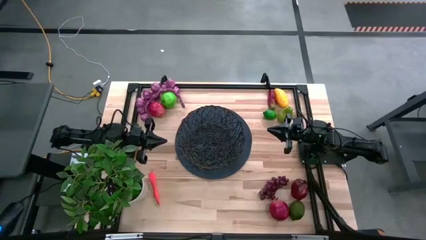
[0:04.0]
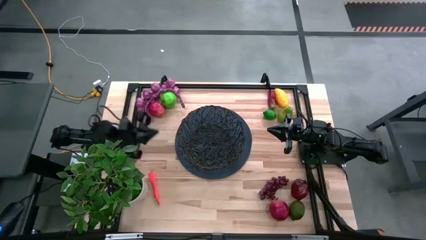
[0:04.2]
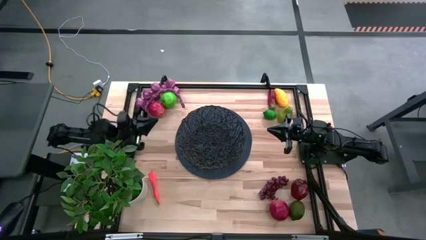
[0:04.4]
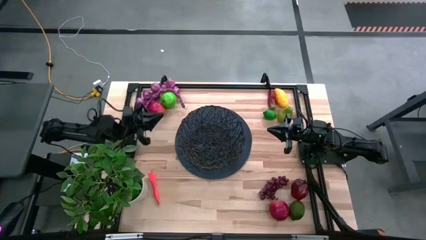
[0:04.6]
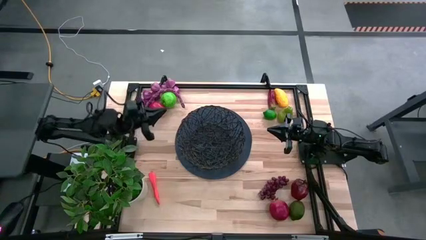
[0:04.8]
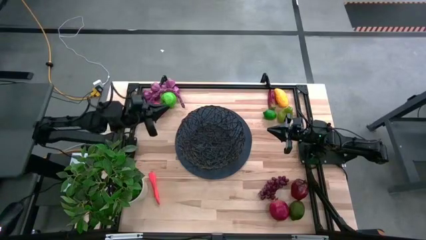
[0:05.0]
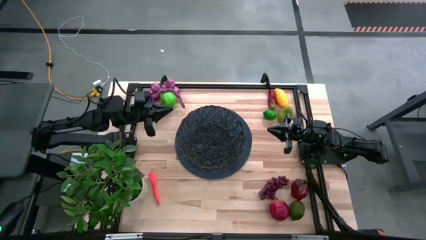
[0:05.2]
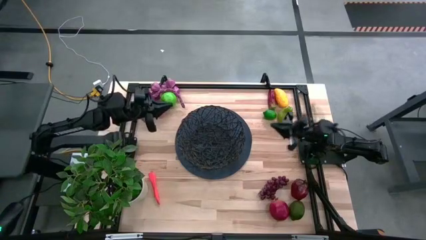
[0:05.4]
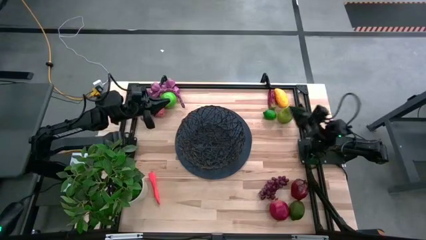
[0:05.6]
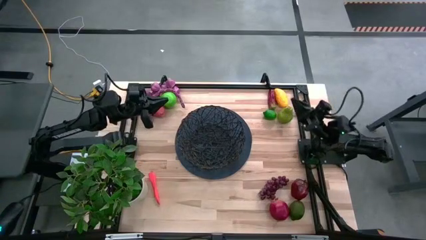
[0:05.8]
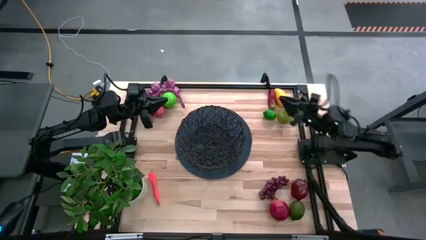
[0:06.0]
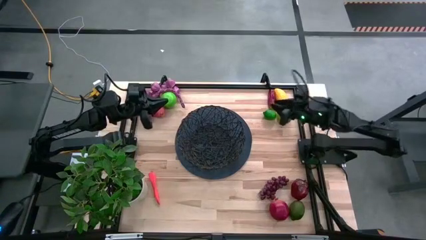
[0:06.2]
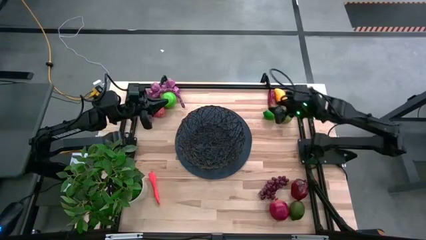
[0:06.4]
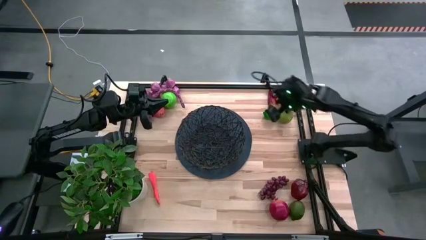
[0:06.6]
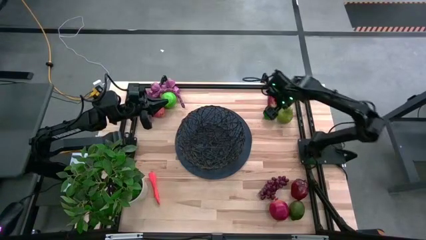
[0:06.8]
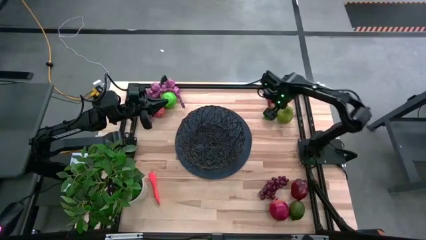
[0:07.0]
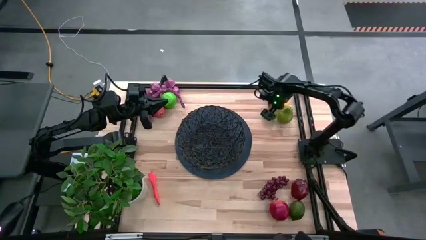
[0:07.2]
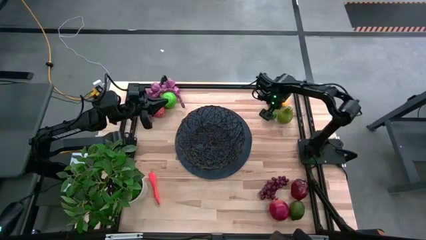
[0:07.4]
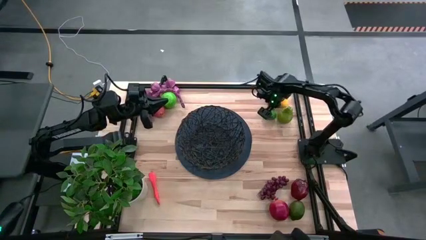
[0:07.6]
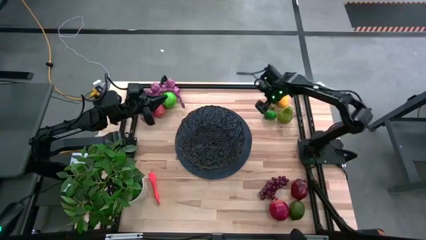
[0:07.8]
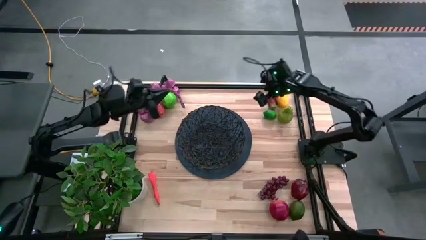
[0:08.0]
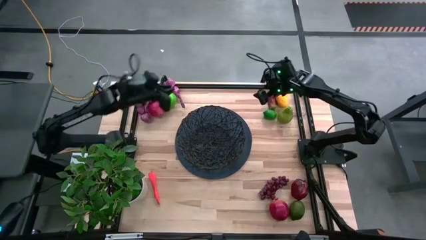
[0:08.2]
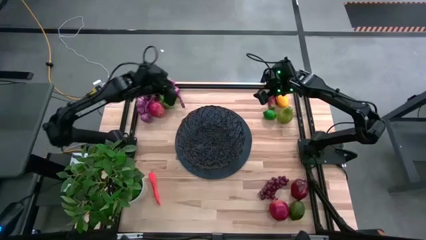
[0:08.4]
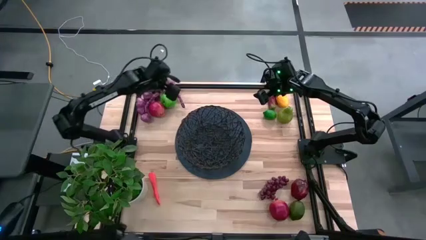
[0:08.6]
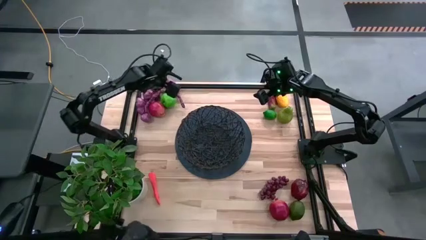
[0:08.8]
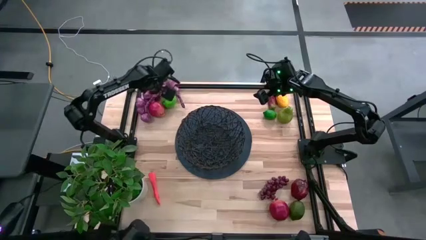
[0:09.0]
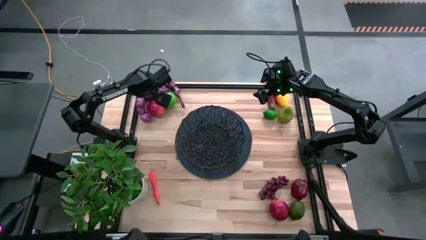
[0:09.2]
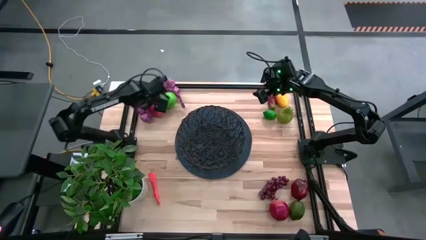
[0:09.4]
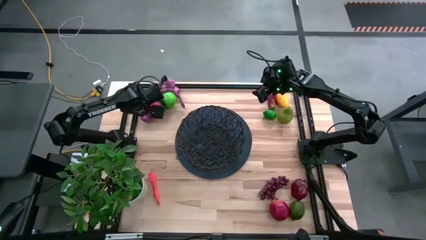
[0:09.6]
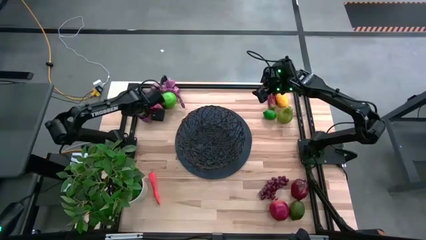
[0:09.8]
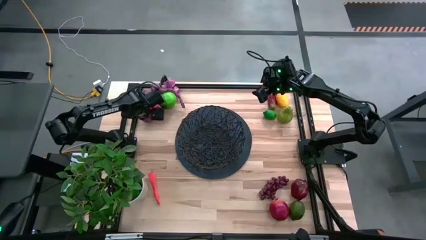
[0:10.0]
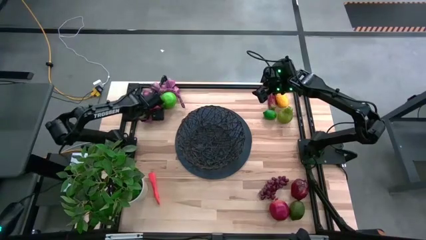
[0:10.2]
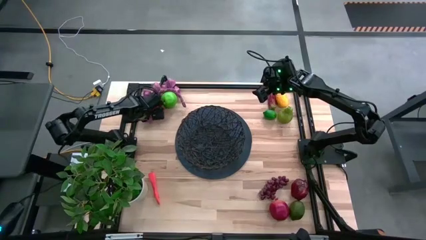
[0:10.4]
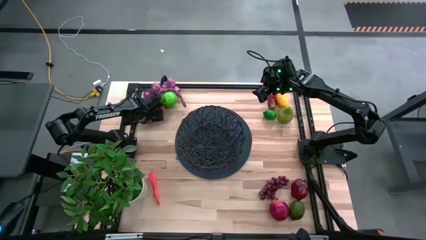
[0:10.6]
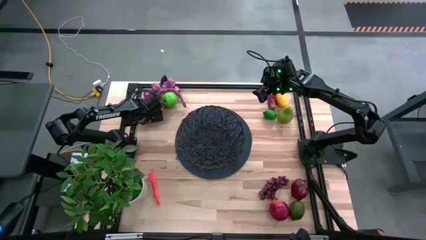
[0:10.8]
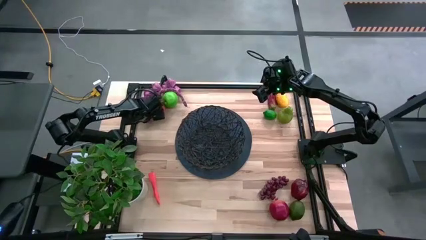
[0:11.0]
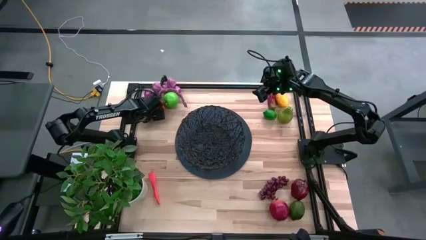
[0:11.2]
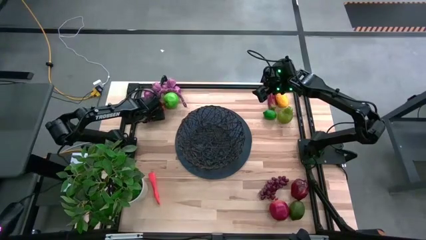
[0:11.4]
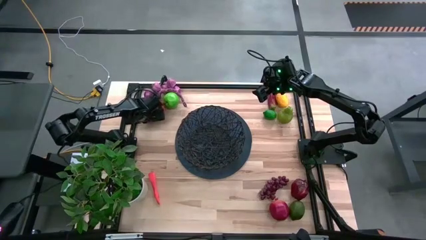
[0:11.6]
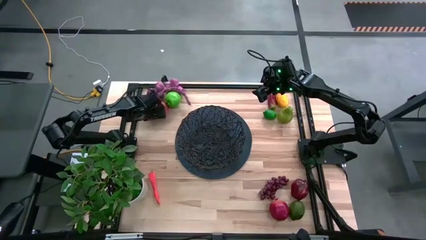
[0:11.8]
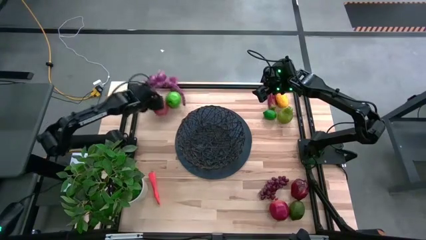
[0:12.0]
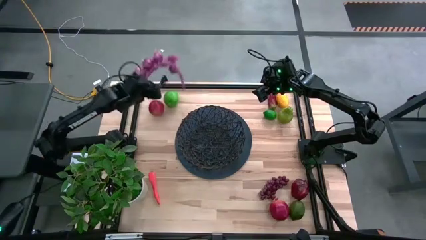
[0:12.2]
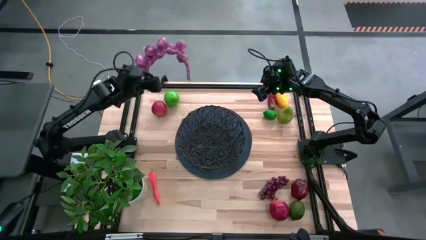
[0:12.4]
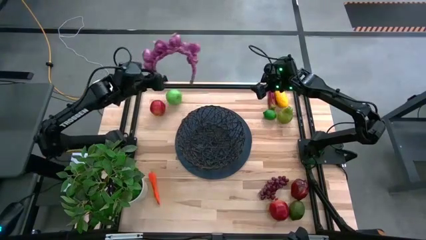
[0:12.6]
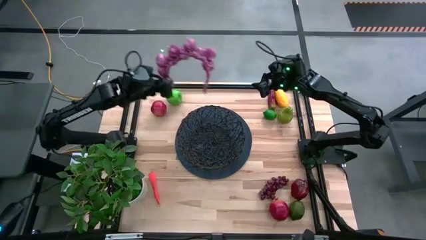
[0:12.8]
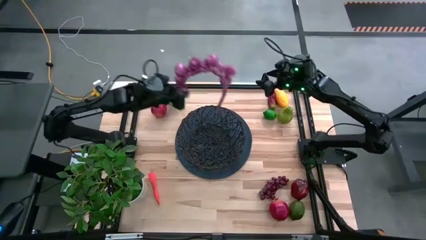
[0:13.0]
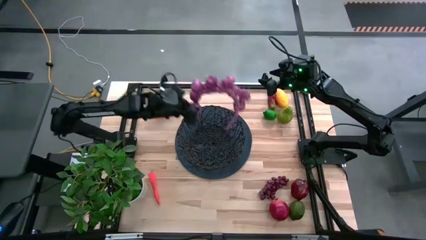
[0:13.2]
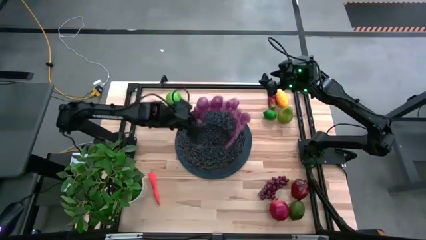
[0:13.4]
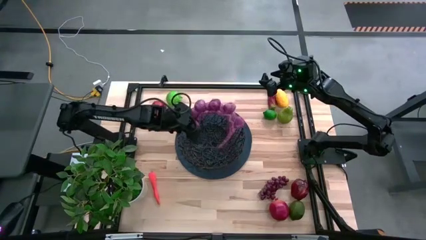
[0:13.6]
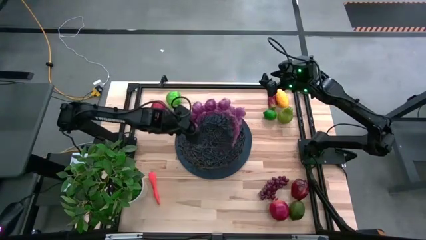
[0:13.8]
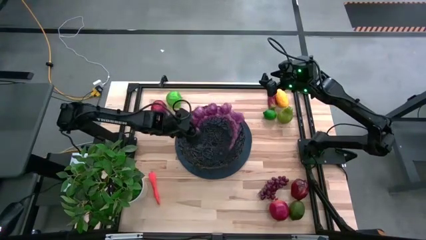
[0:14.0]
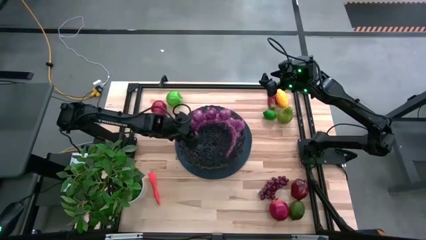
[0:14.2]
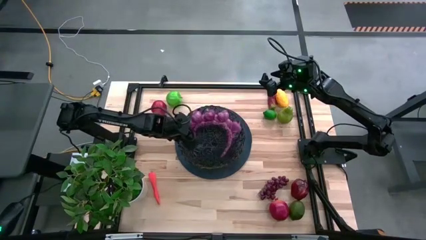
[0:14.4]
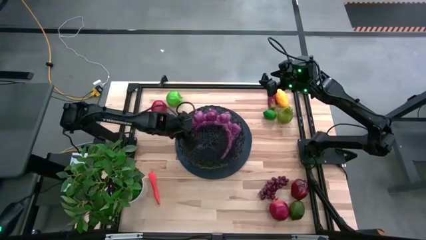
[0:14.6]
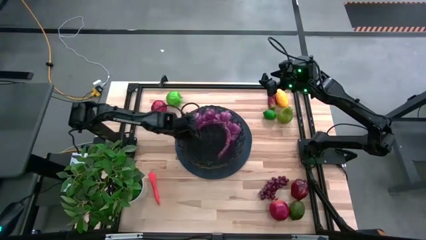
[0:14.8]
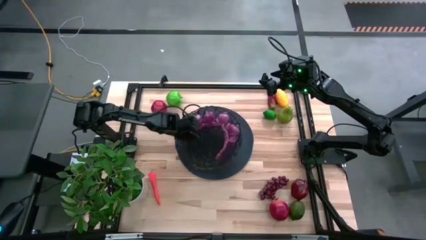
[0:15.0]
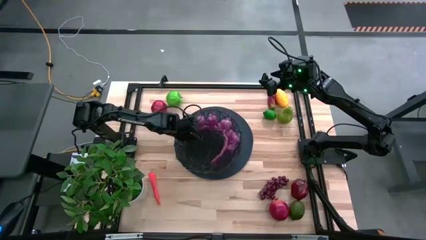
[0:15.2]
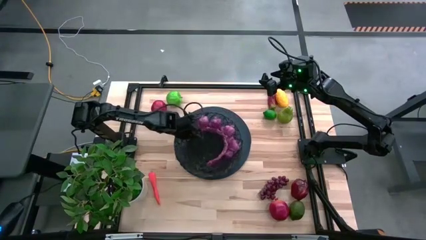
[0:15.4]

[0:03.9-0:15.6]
Task: Build produce basket
Put the purple garlic into the basket
